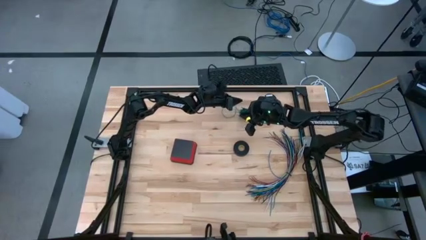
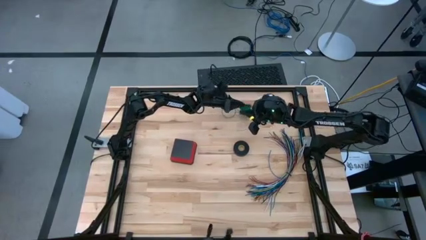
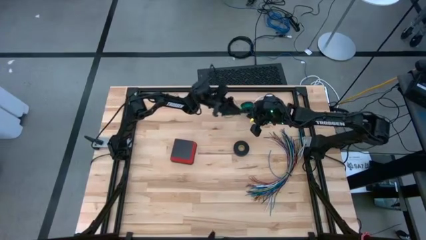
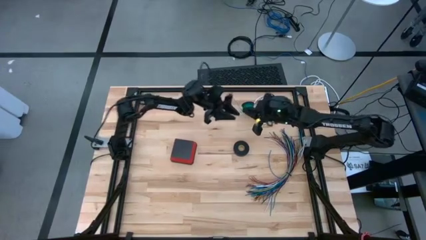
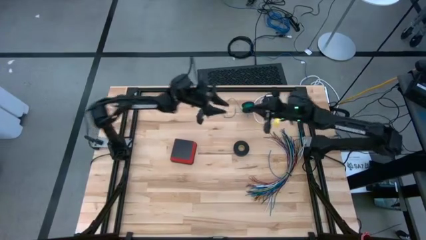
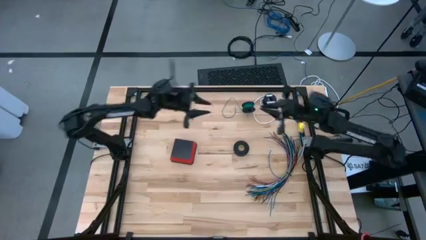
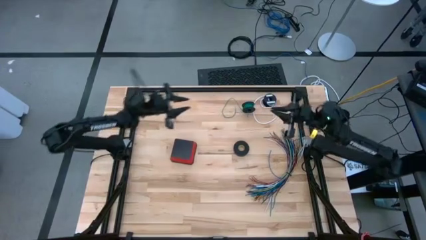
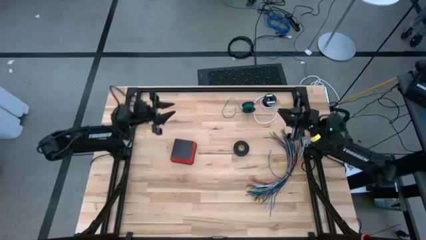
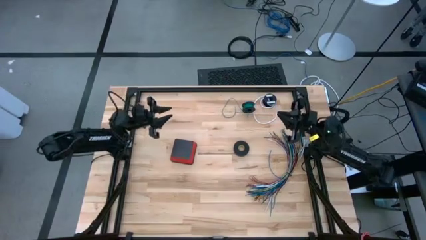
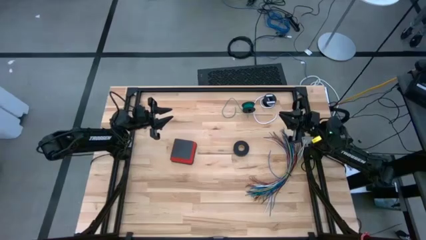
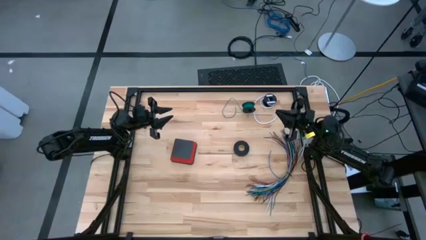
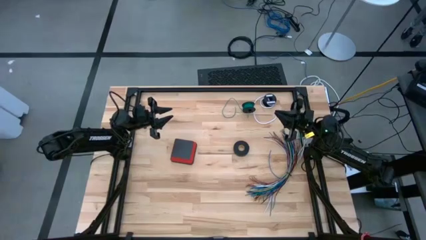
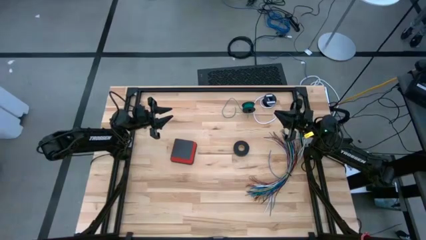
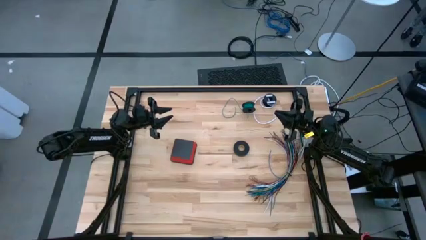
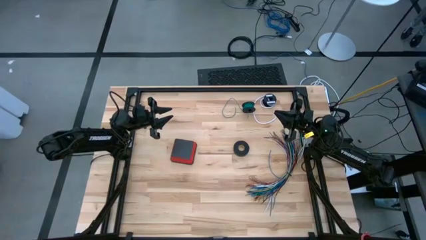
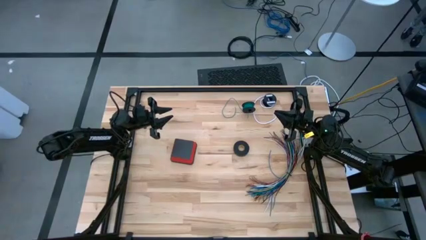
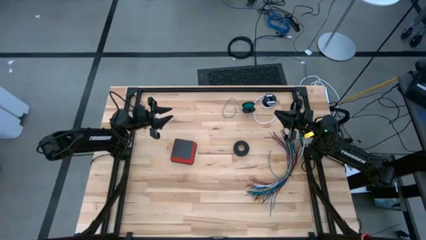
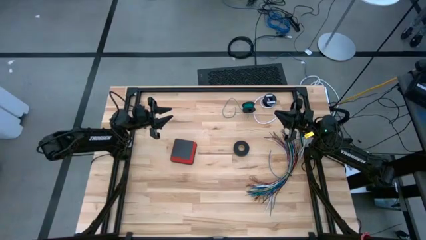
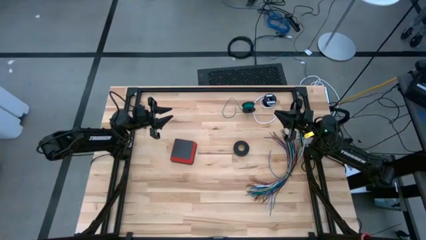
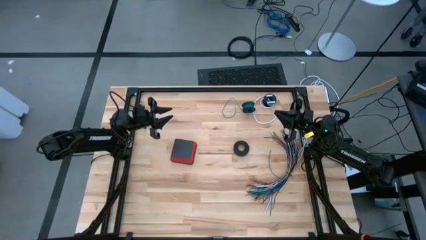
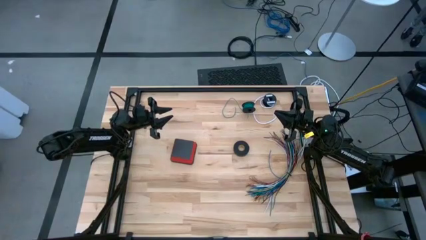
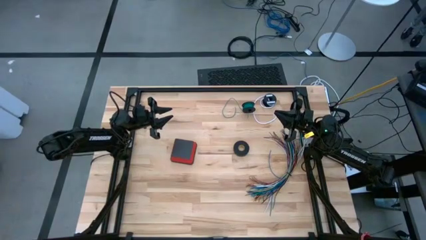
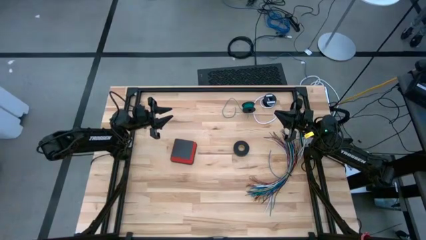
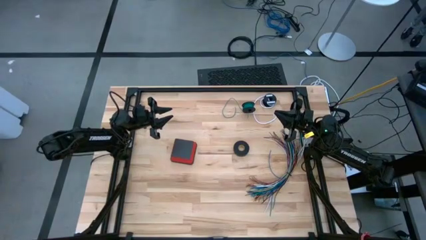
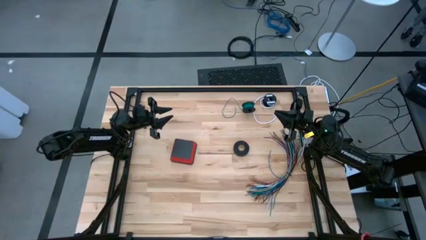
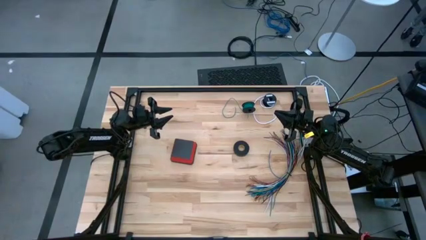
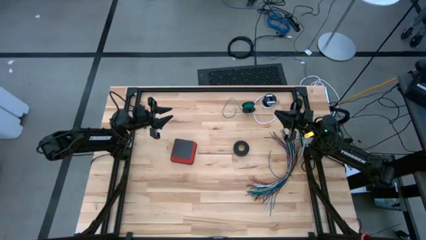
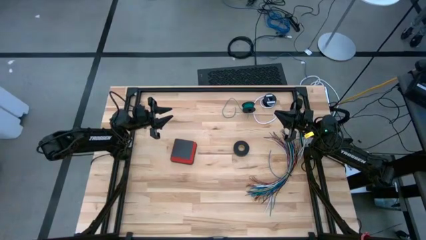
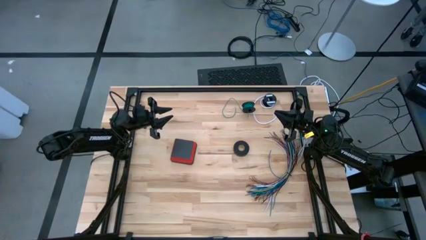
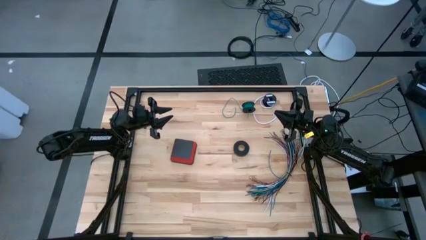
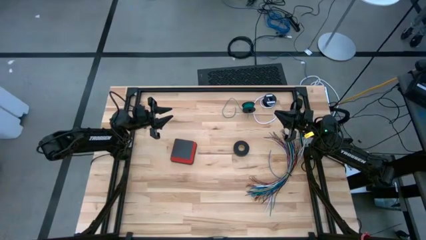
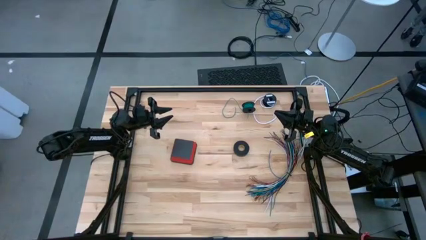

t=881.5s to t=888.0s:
Task: Coiling cords
Return to Home Position

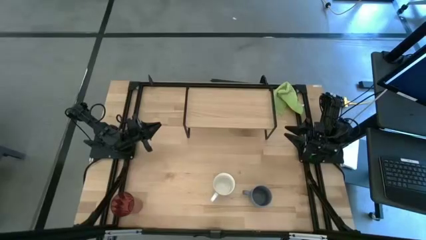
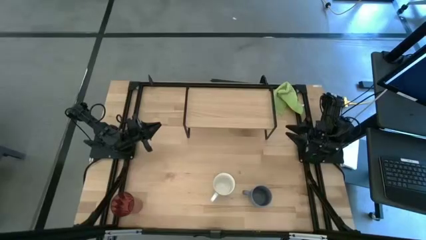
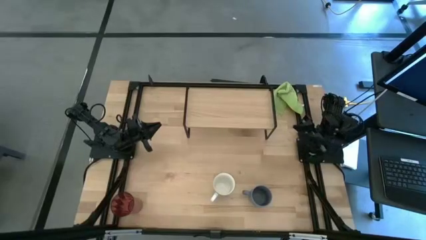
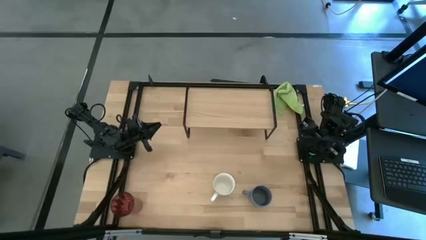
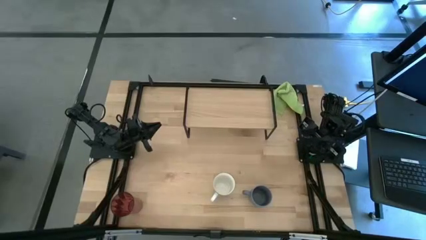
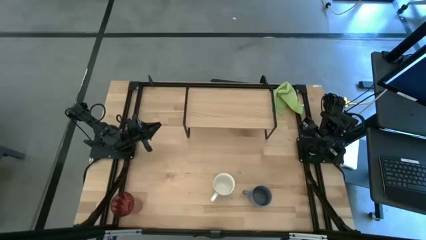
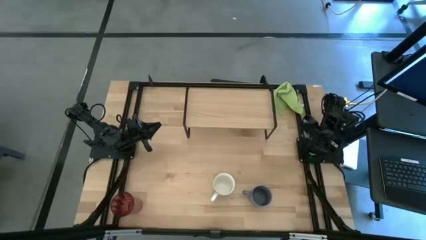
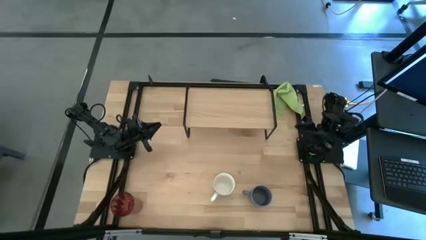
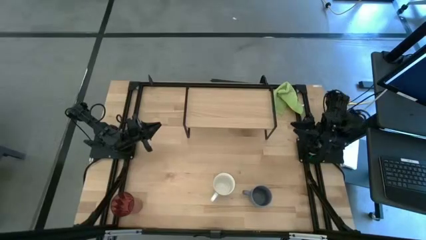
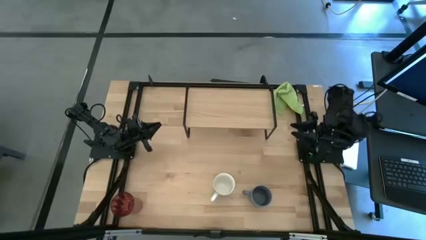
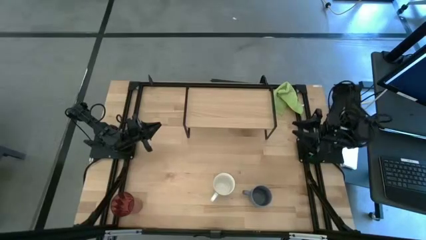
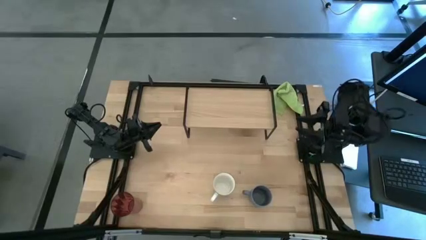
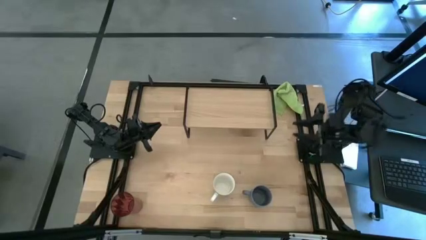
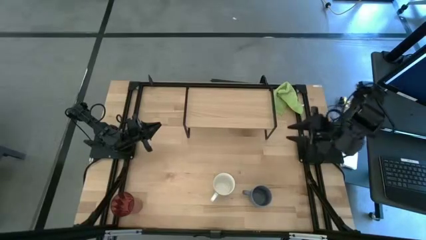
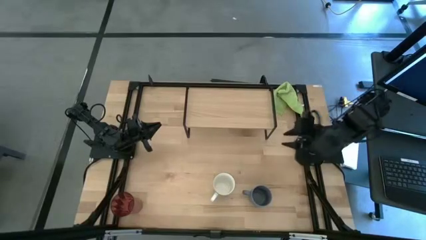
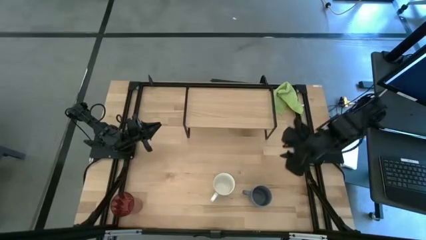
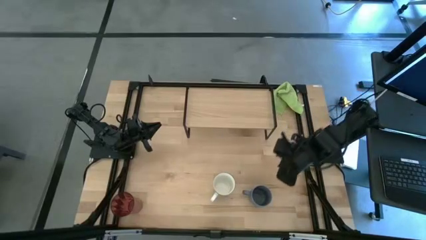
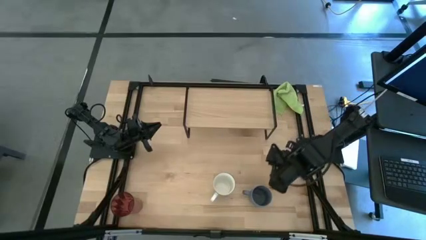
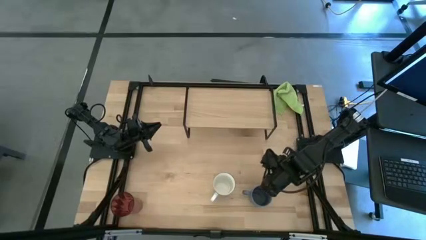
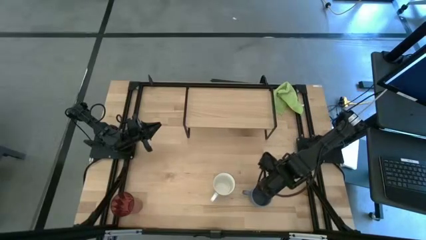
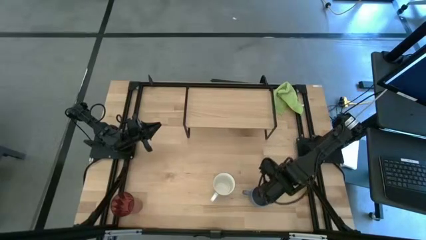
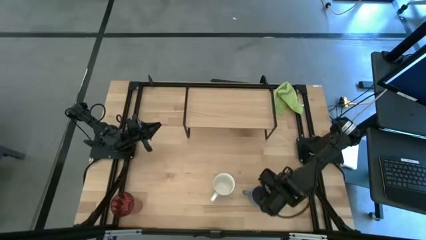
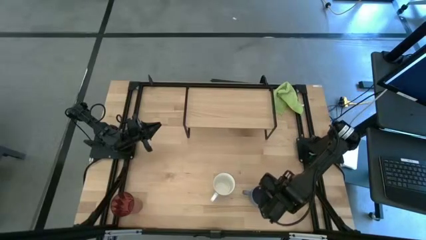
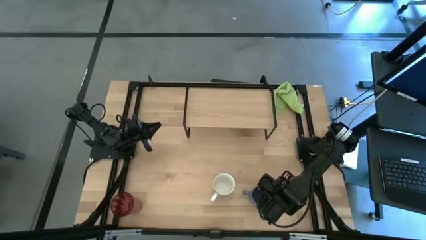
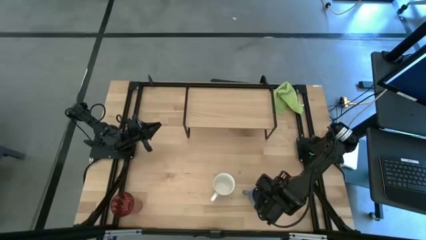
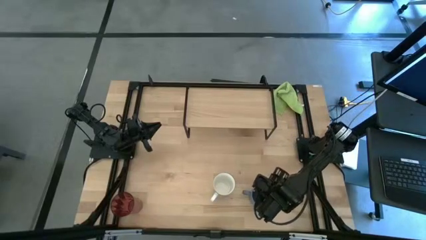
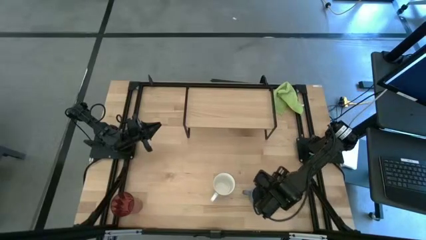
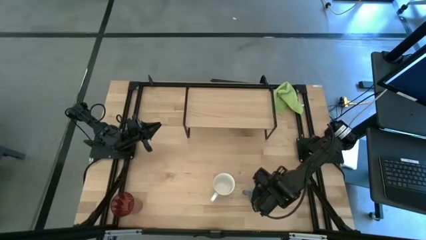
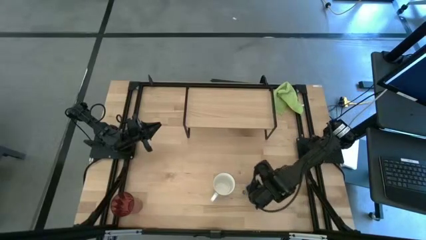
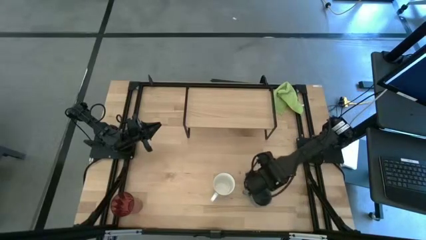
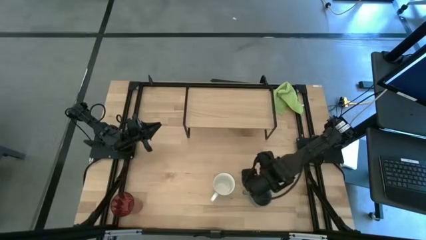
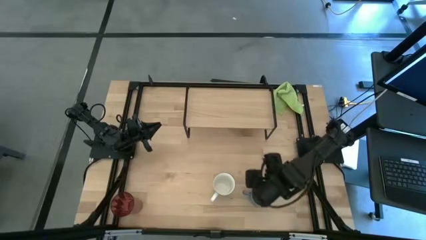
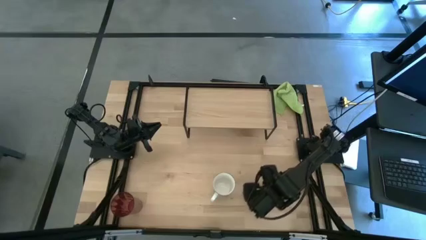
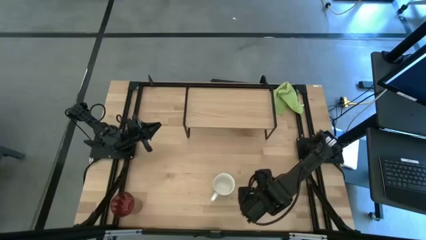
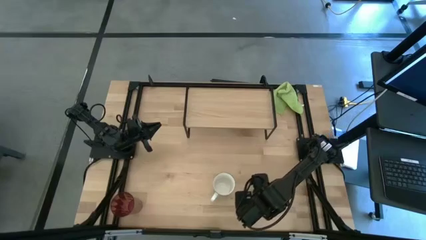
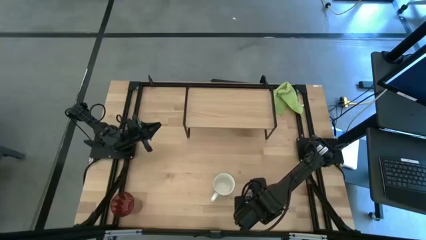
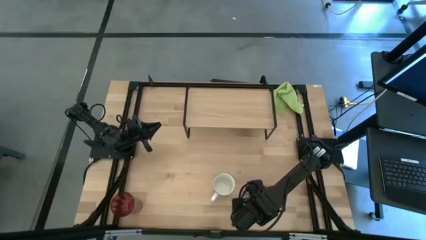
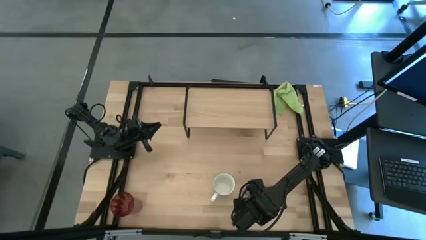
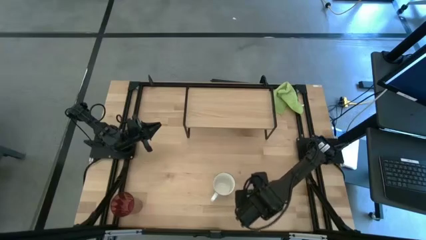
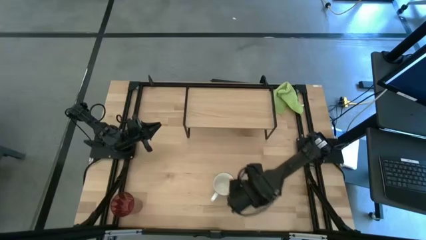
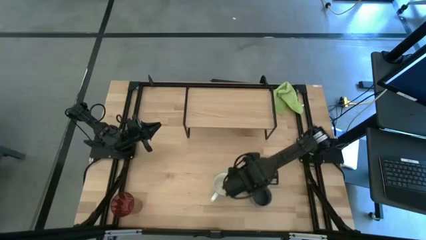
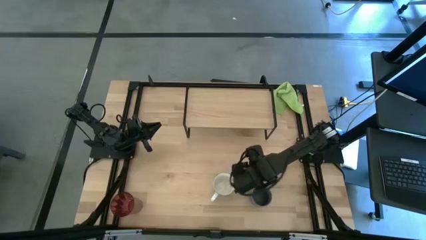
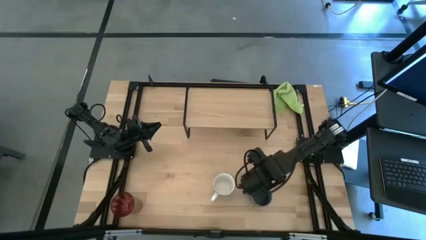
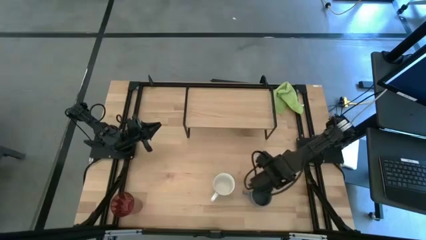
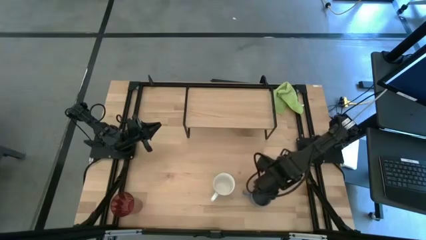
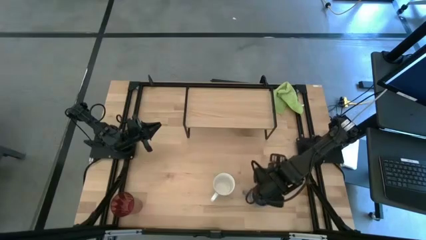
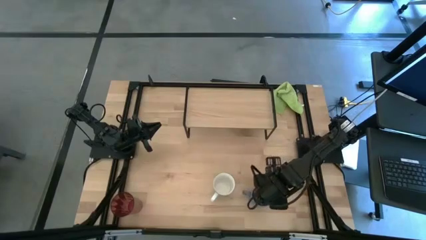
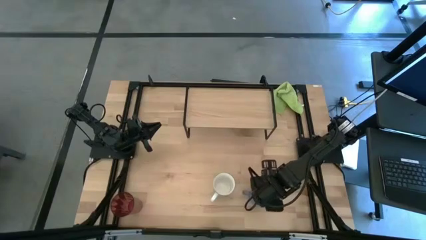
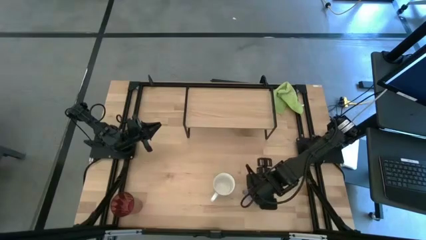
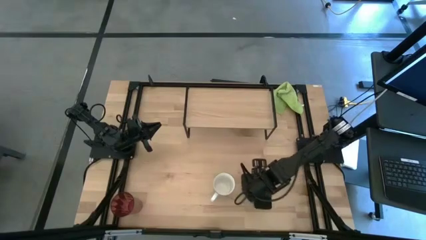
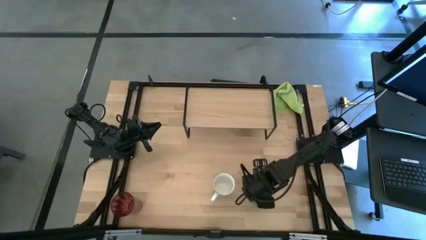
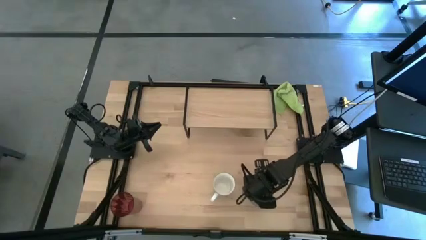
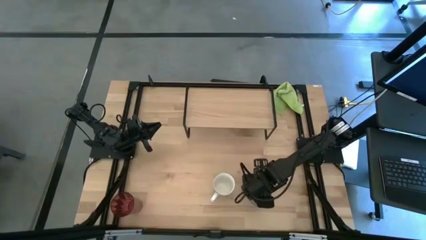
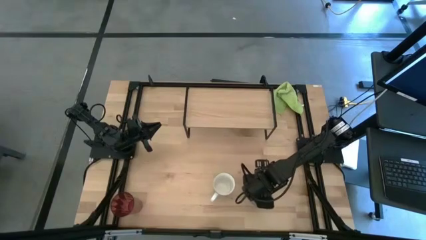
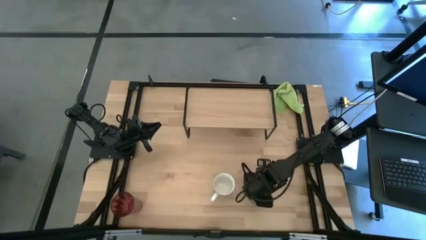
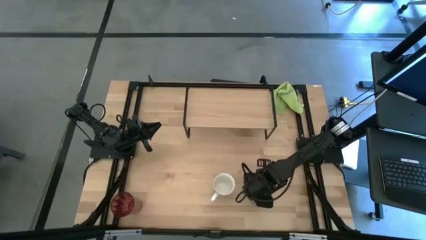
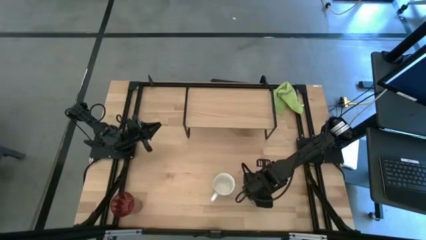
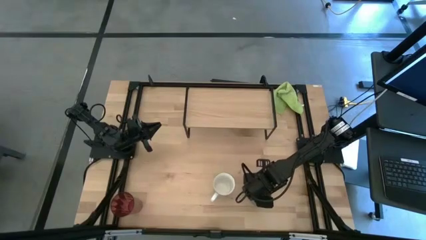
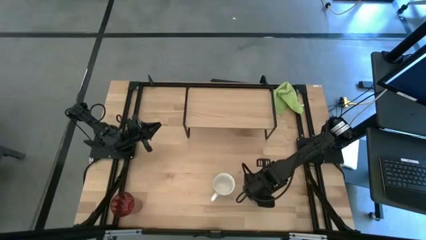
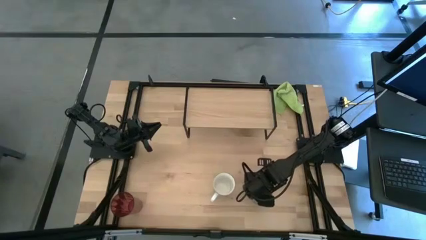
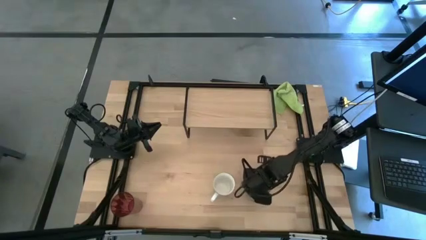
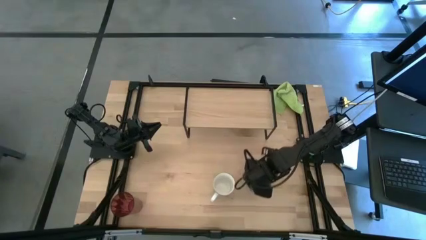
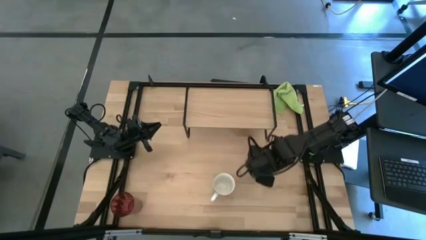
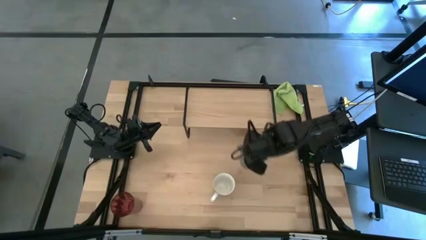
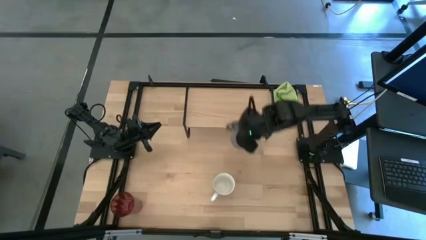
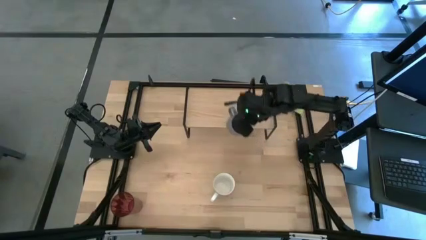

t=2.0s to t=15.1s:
Task: Stack small to large cups/mugs on shelf
Put the blue mug on the shelf
